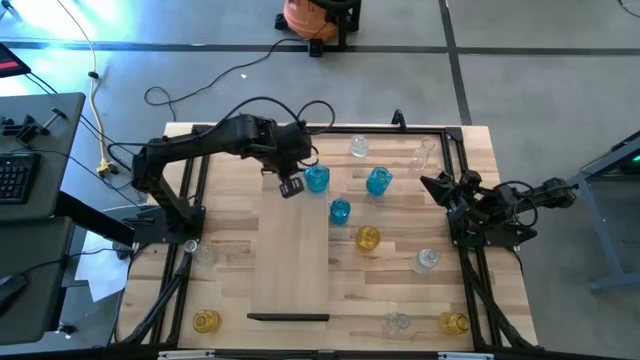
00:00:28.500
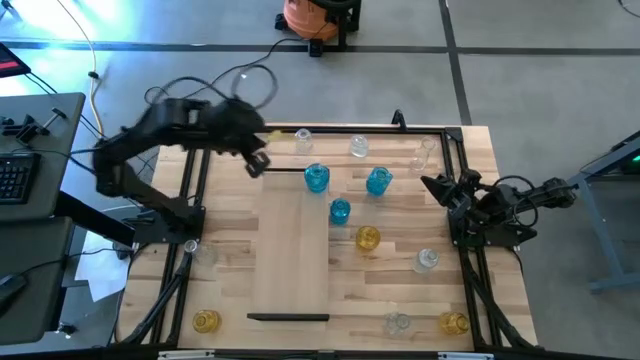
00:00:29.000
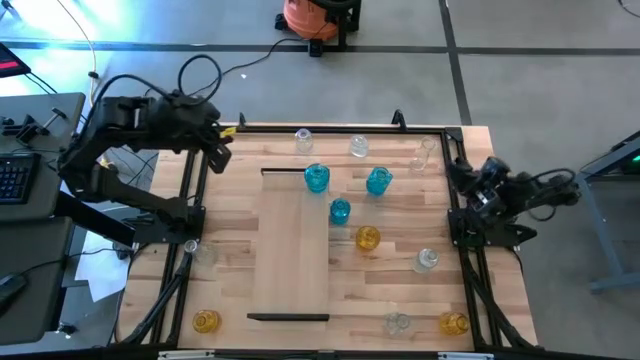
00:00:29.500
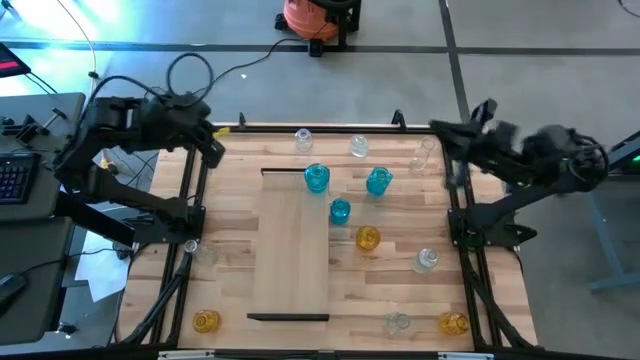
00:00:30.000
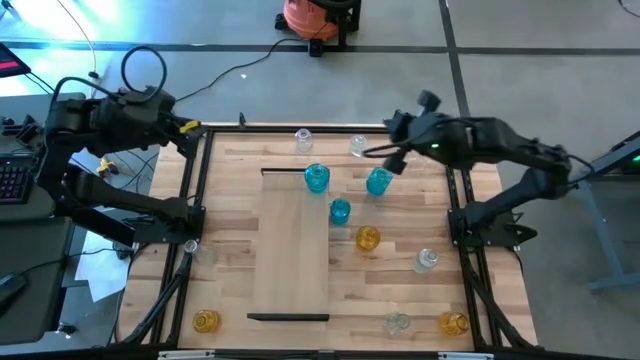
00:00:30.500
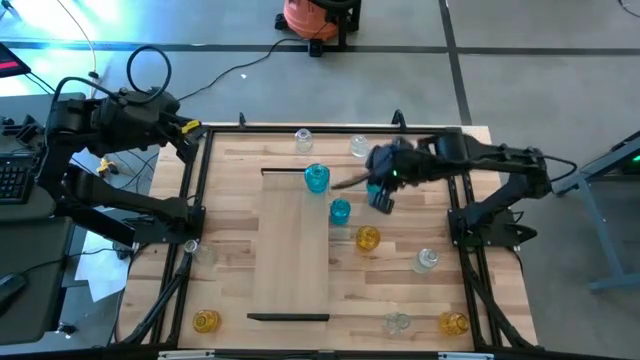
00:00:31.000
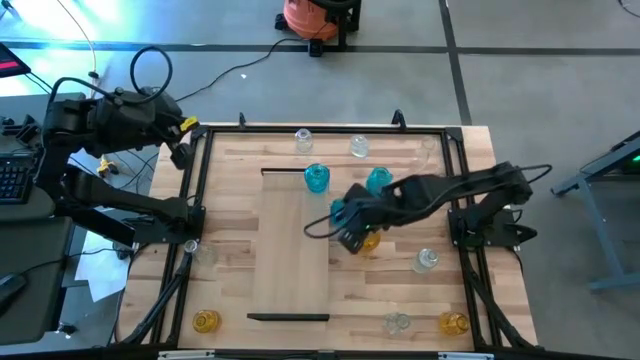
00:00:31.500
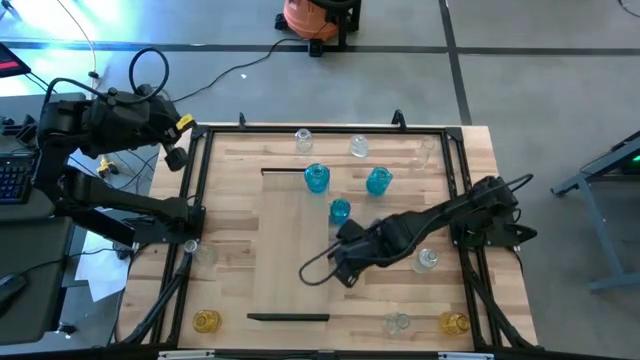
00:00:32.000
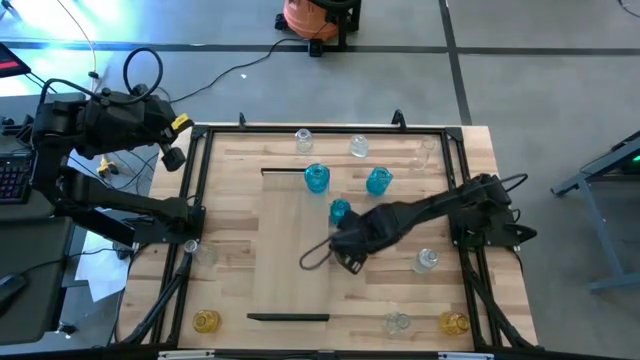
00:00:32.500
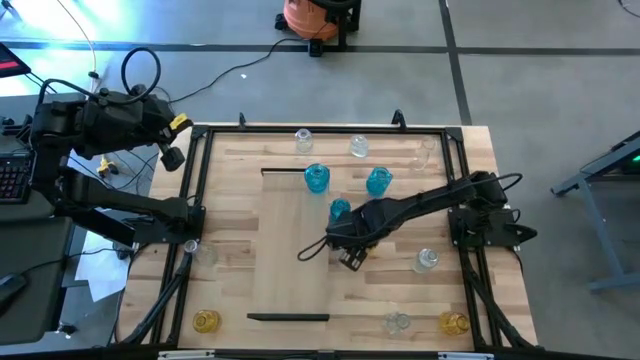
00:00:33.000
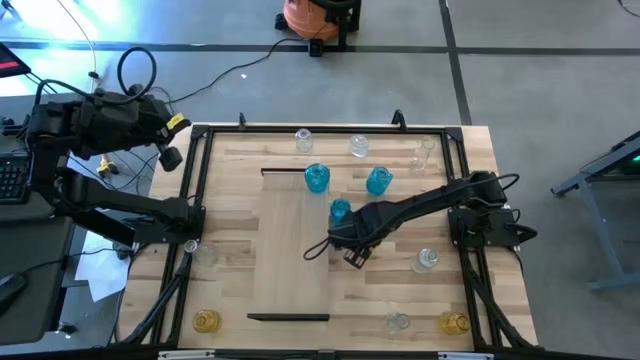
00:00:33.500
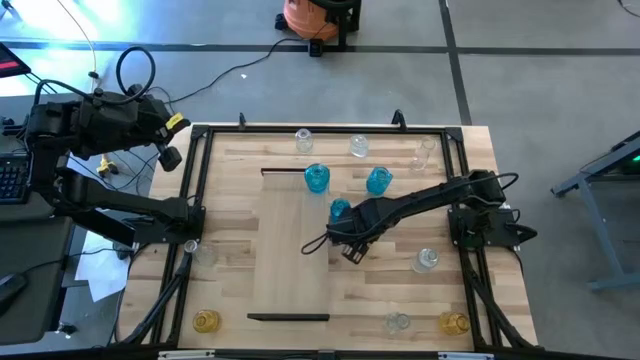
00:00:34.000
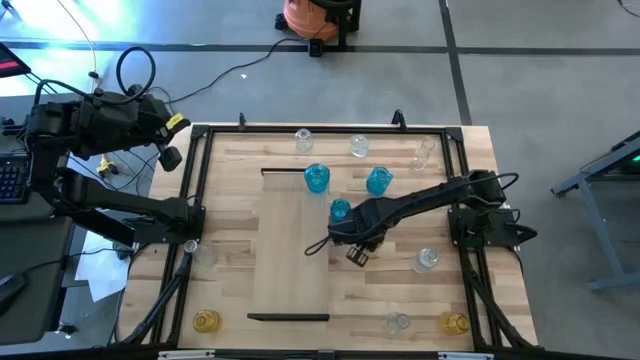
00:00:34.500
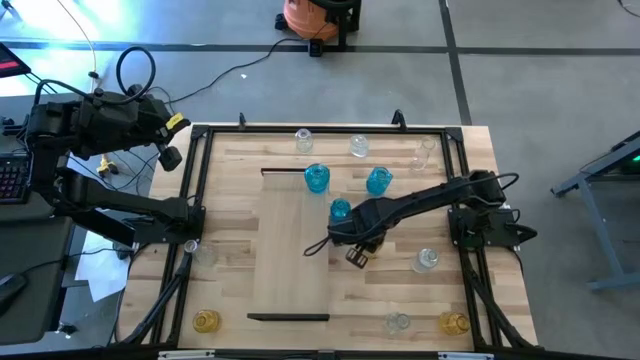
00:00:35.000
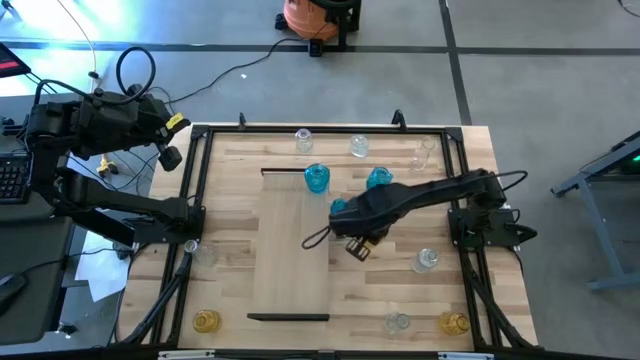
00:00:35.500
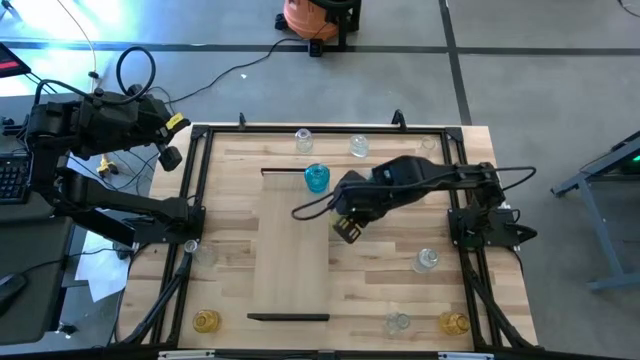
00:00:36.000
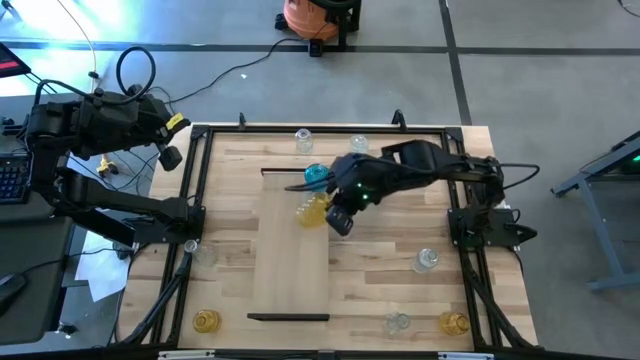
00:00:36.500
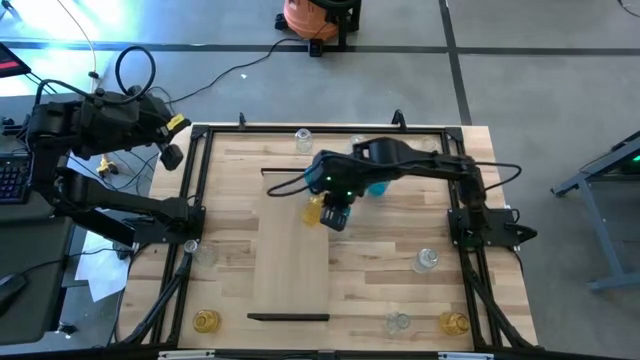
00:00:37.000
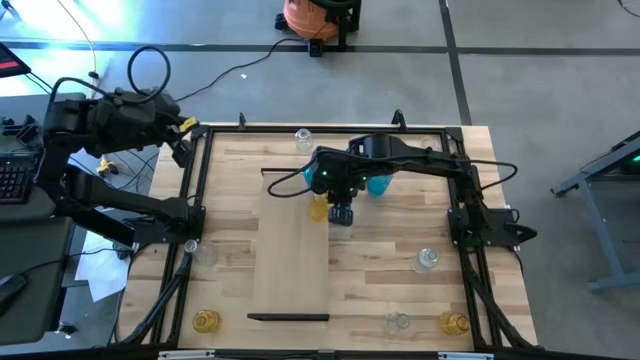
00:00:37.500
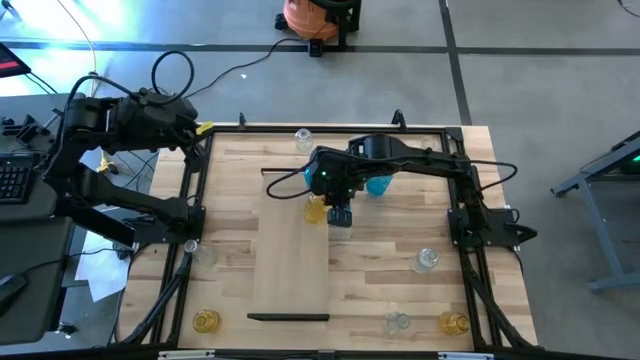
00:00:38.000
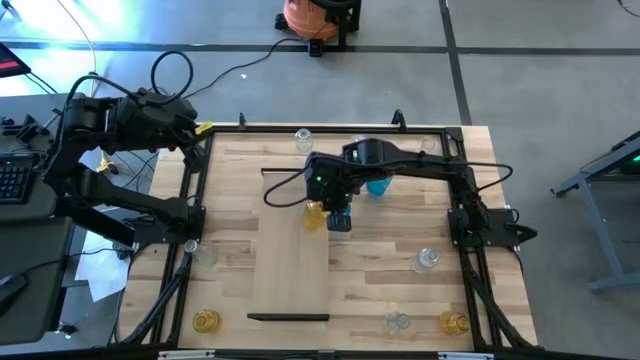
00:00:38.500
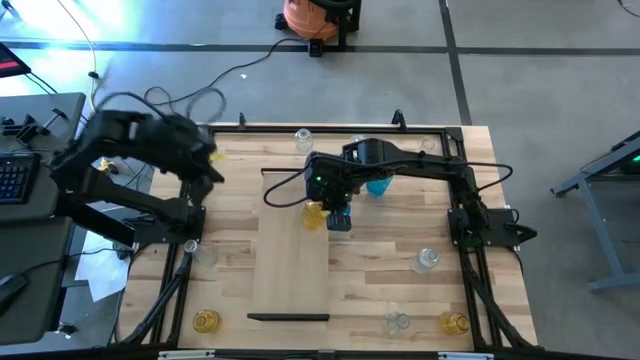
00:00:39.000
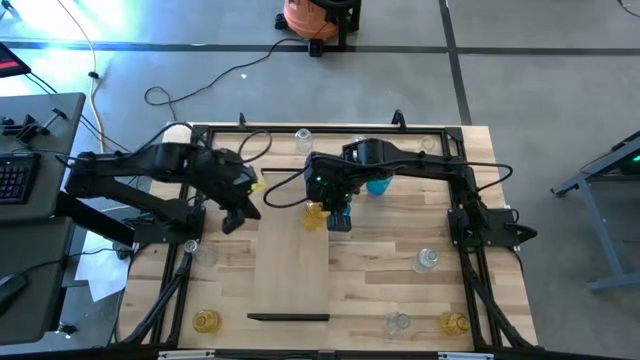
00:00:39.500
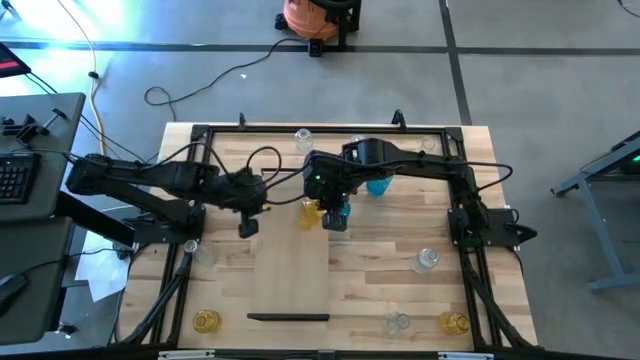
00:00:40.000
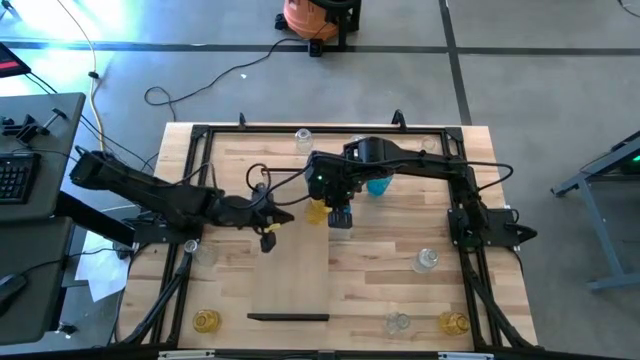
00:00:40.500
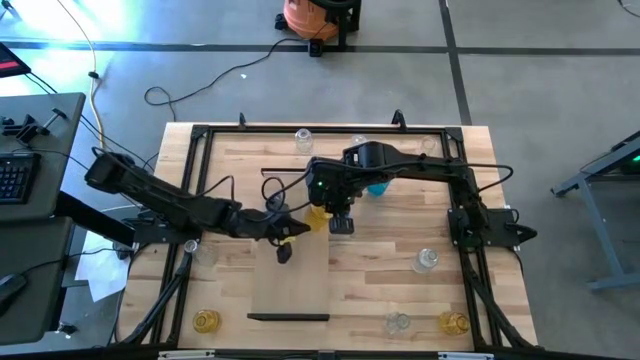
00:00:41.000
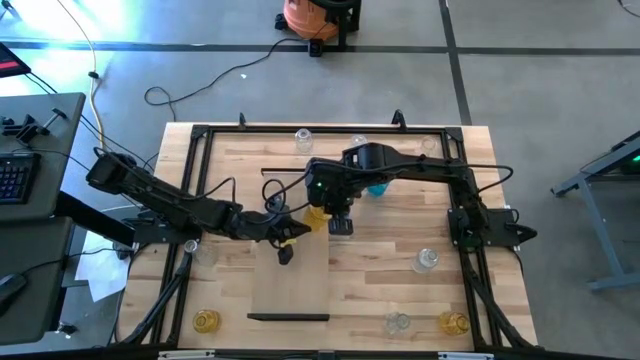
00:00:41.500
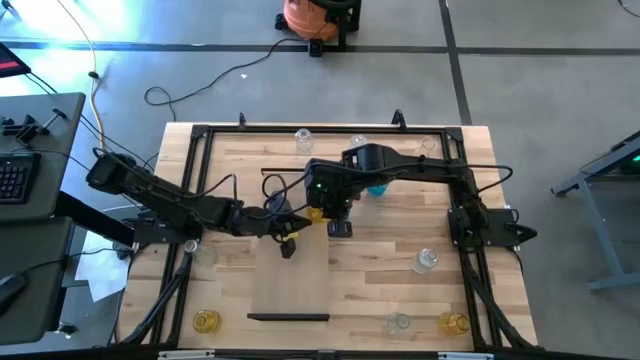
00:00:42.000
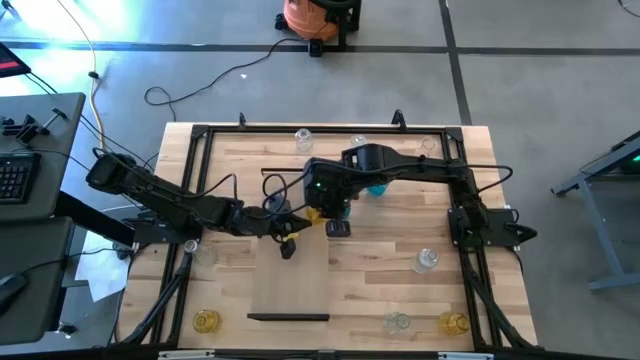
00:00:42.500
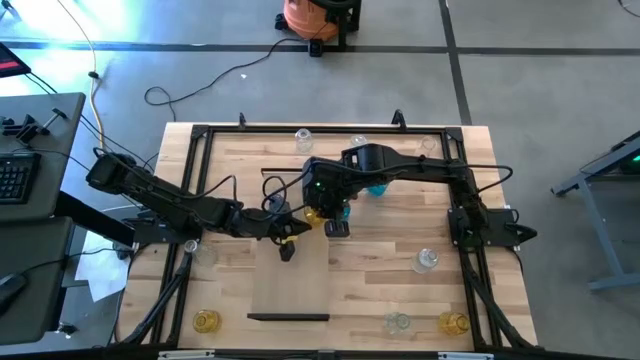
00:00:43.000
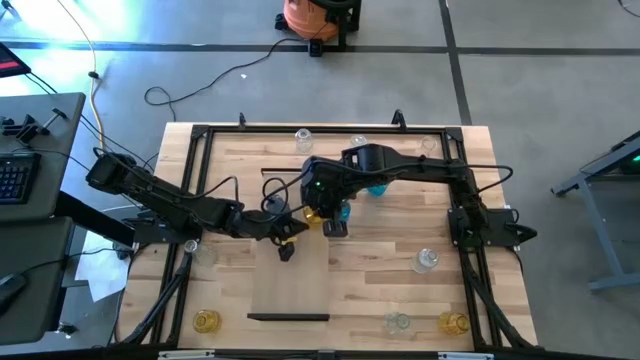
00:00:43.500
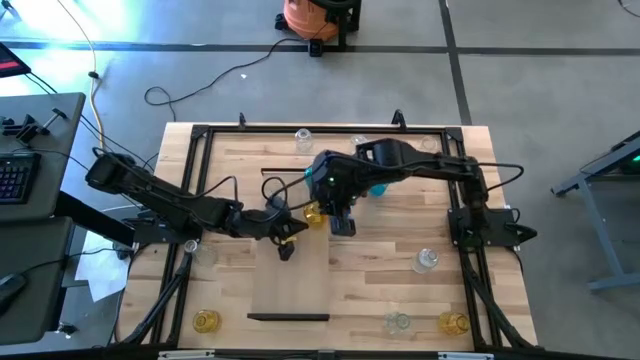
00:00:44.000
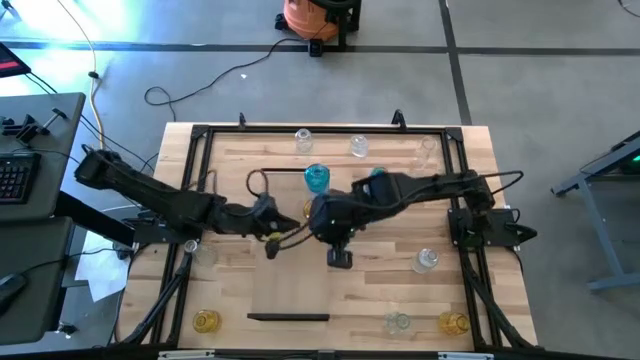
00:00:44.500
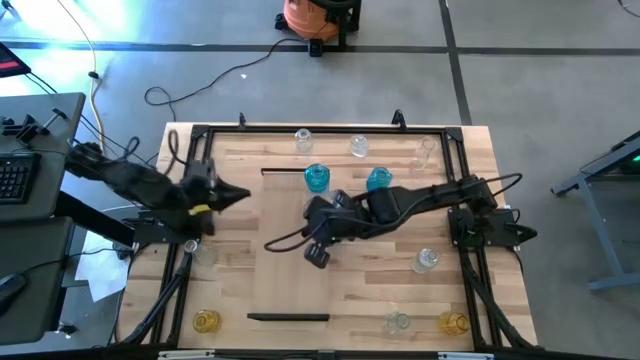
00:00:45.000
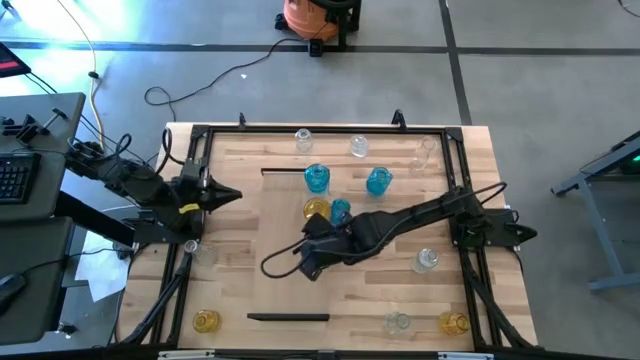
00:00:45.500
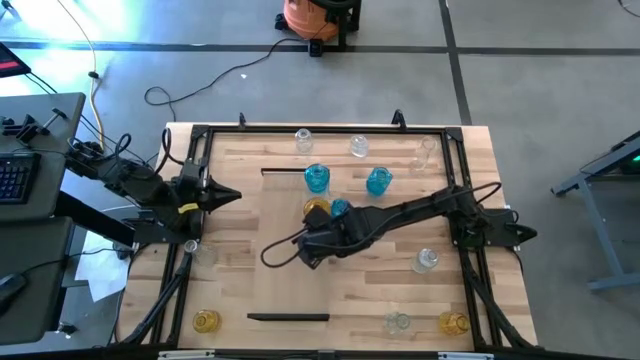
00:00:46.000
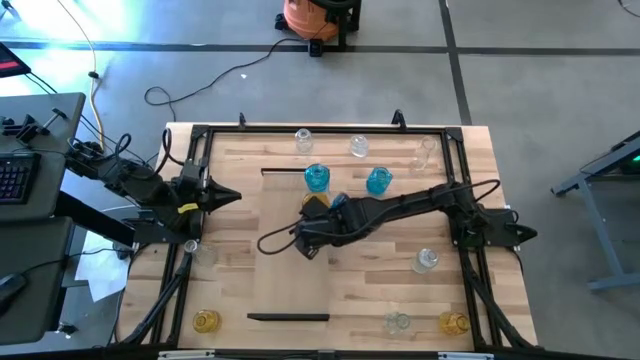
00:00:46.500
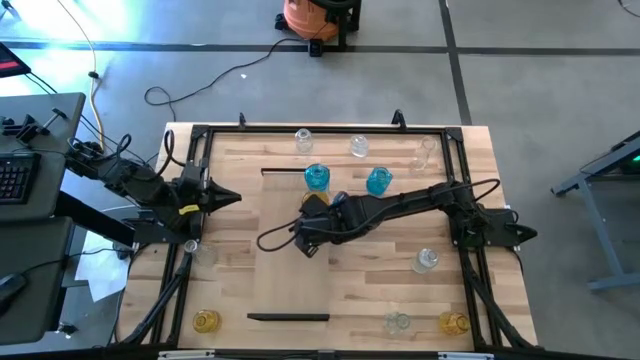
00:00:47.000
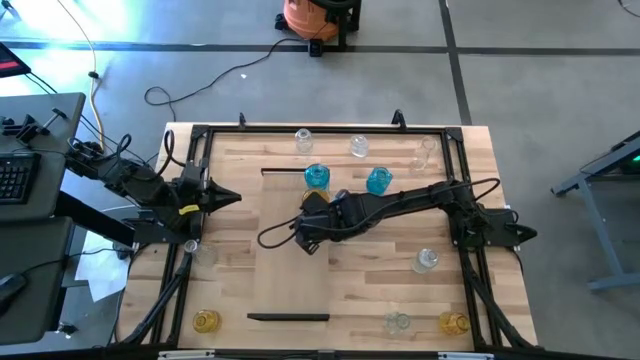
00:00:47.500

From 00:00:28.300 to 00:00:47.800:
Task: sort vases onto shelf
Put the top yellow vase on the shelf

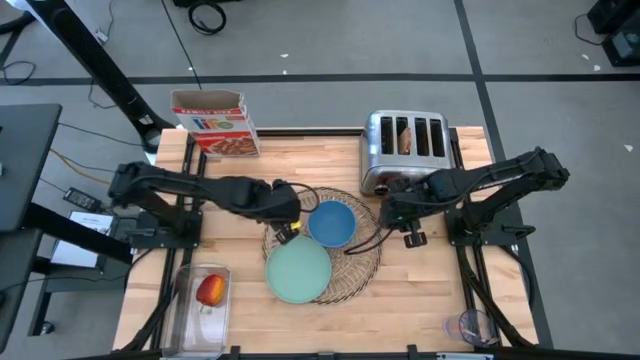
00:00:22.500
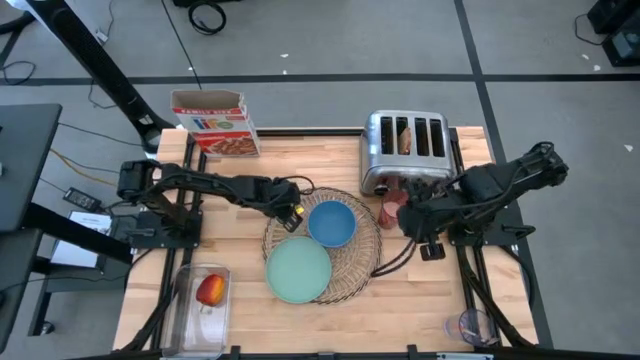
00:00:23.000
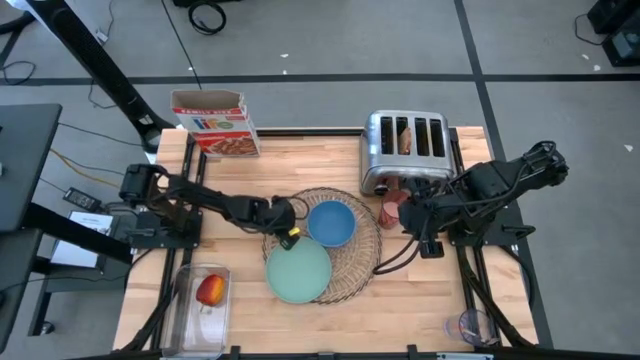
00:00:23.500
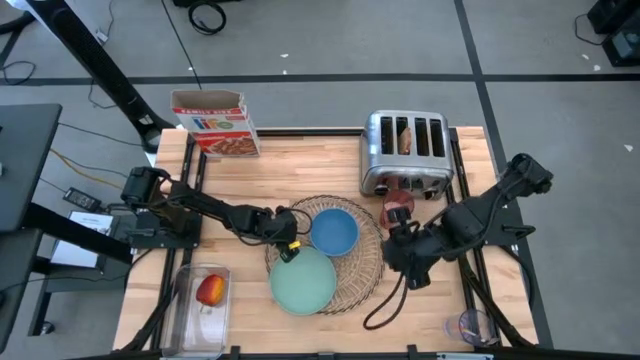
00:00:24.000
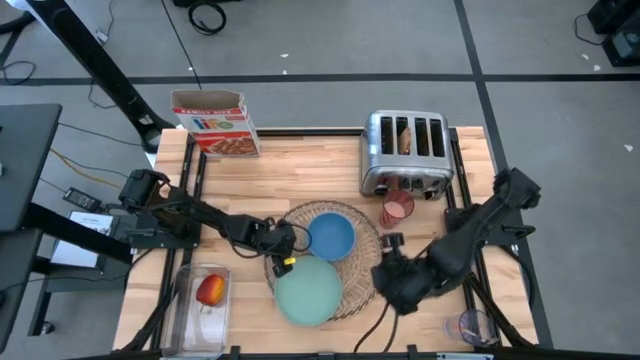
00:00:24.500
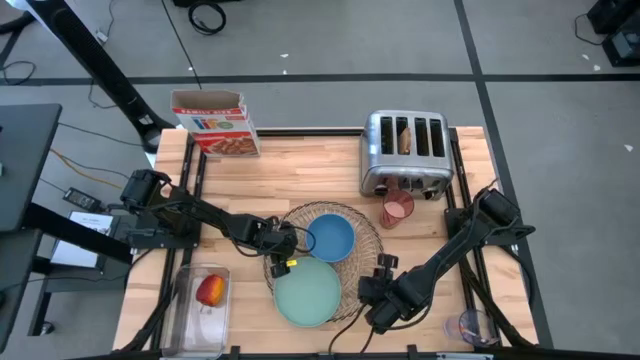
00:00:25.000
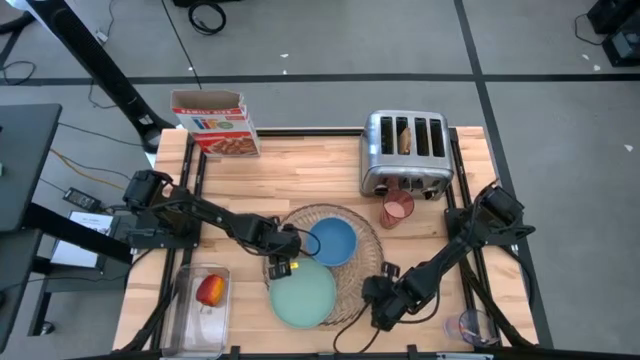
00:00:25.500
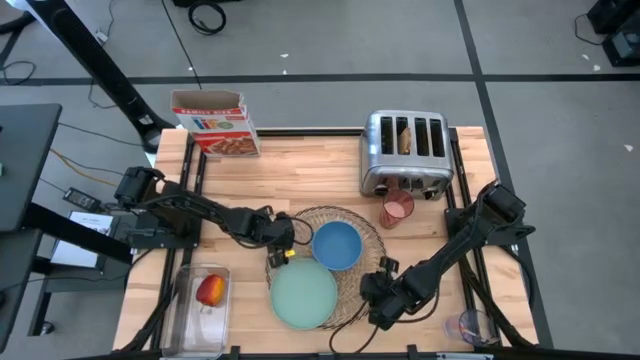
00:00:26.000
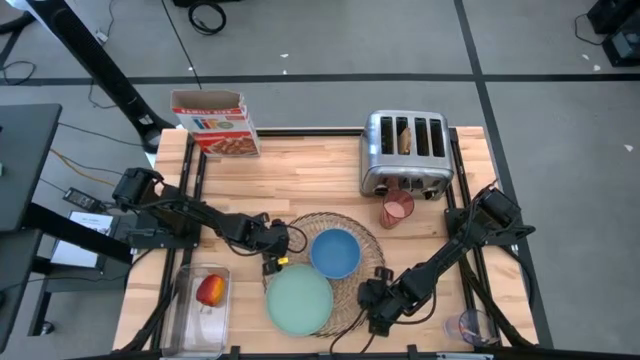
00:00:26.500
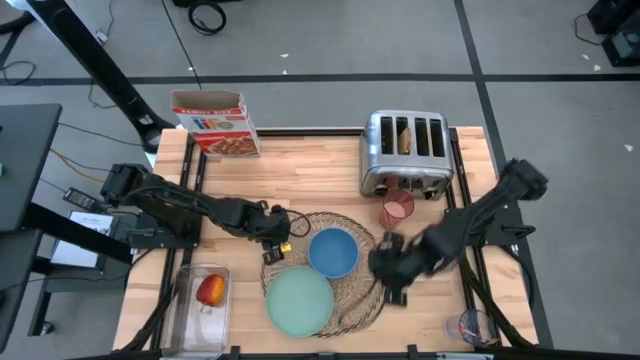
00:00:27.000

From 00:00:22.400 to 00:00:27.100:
Task: Arrange a breakfast setting
Adjust the brown tablemat
